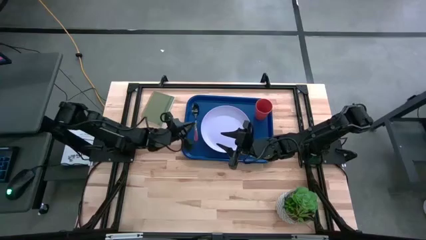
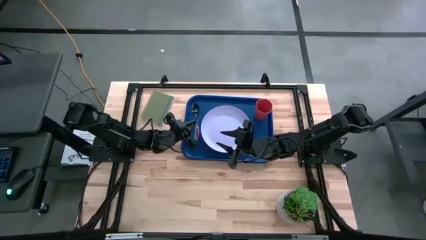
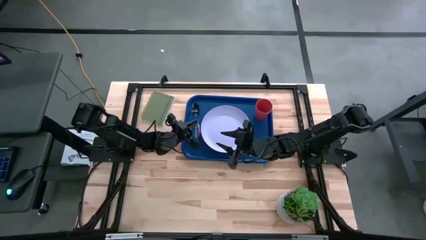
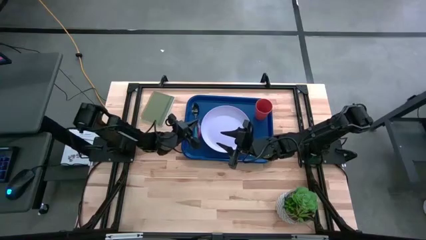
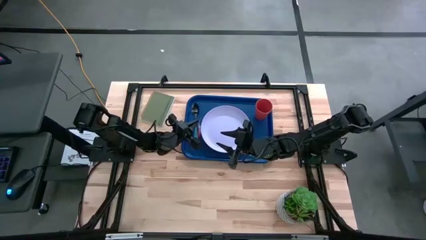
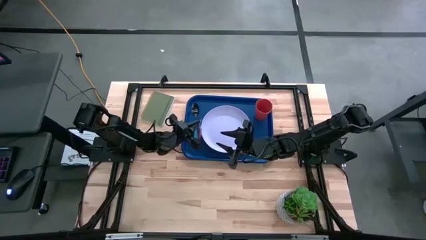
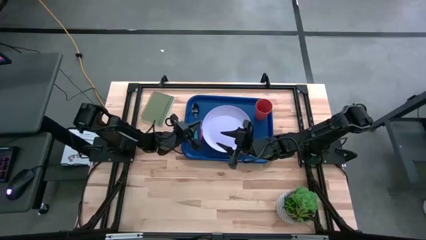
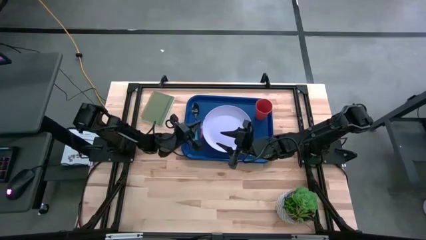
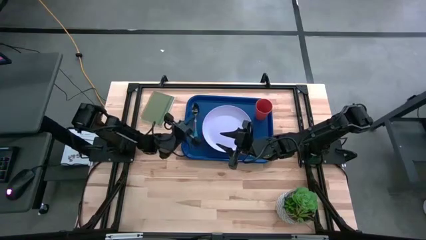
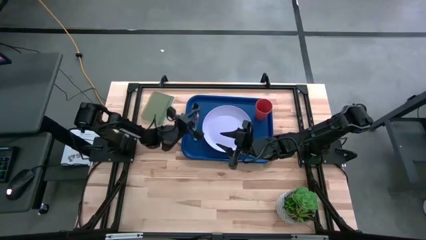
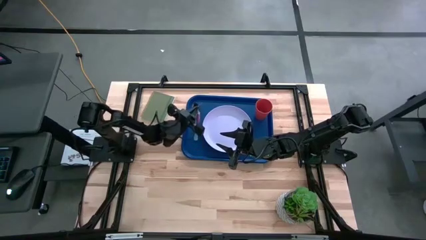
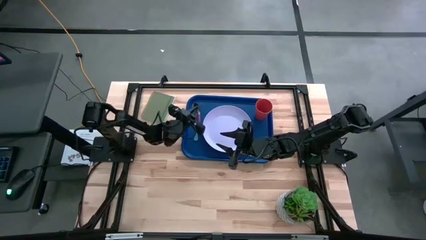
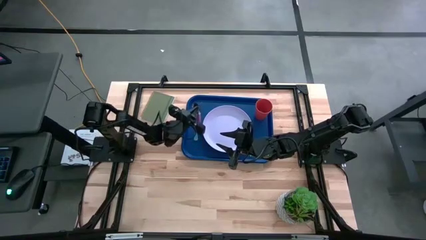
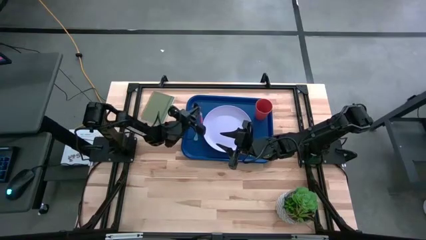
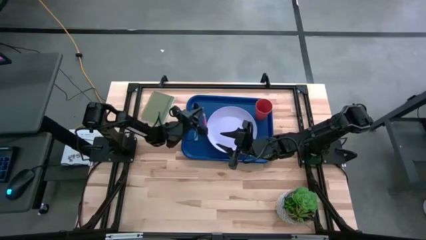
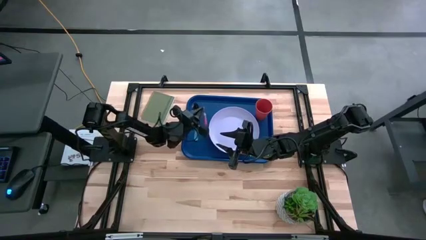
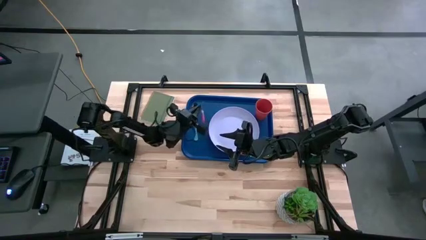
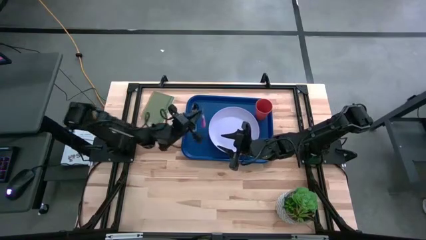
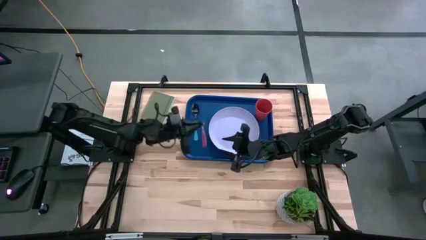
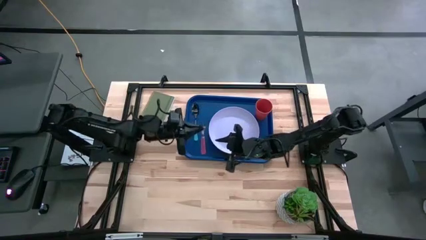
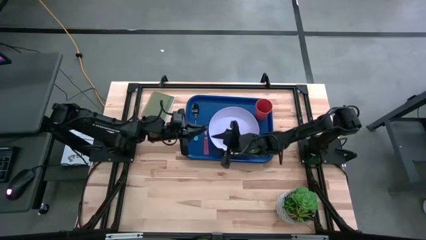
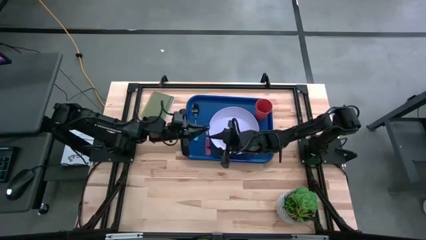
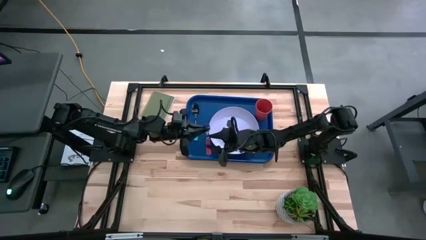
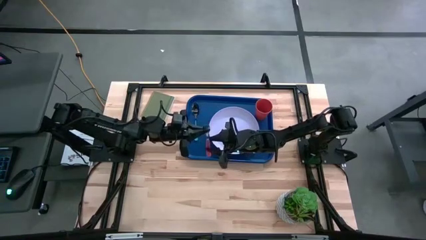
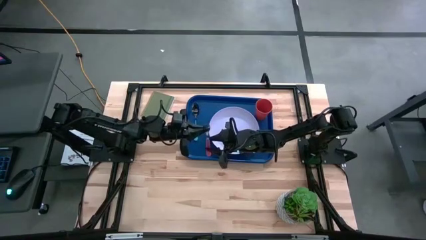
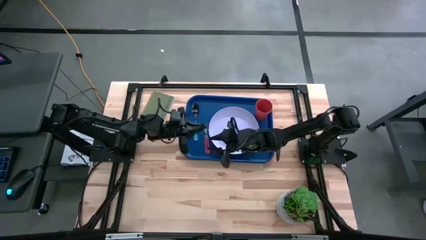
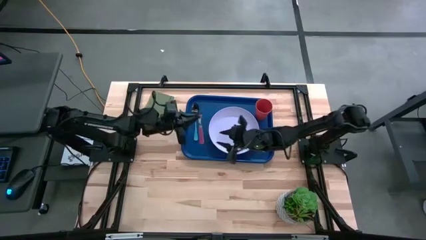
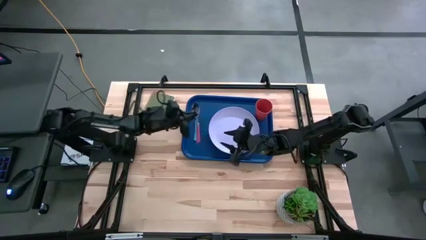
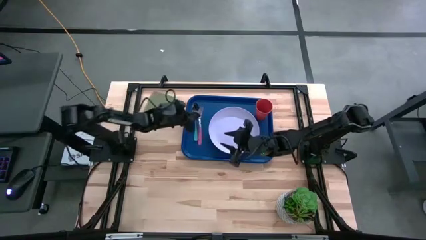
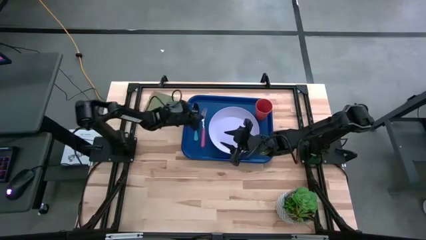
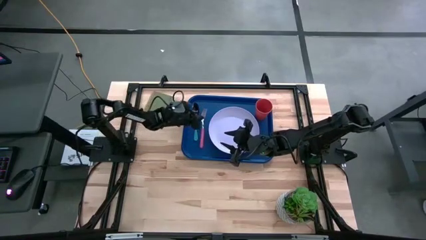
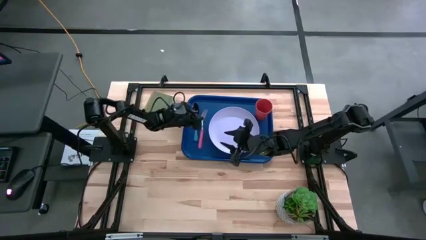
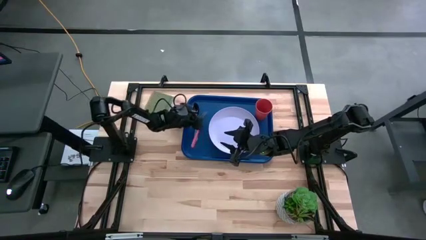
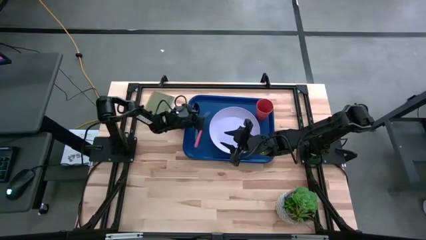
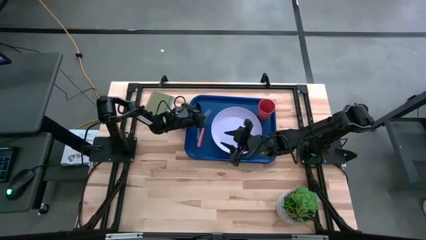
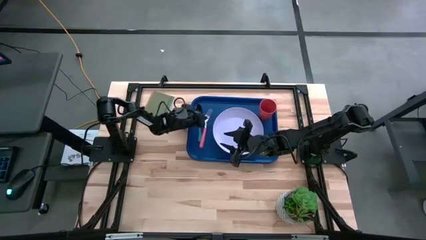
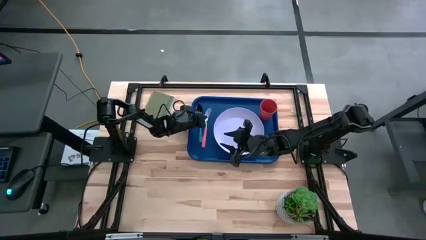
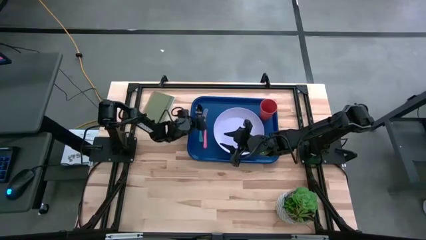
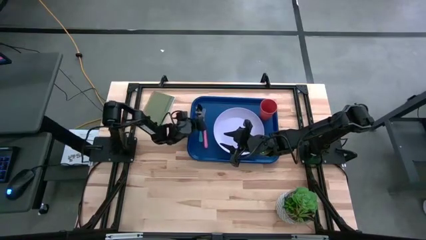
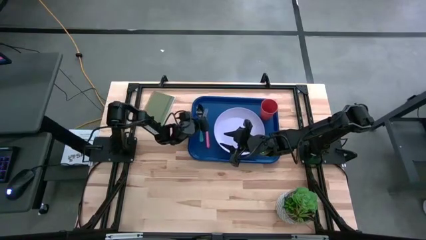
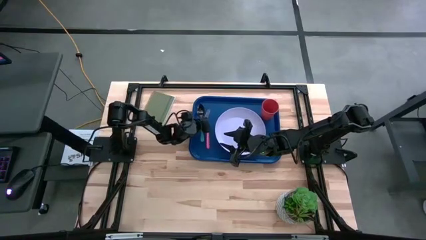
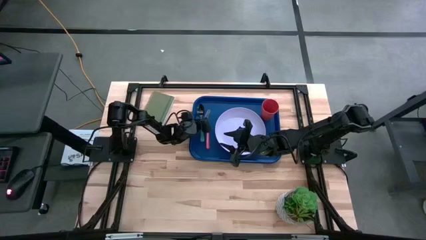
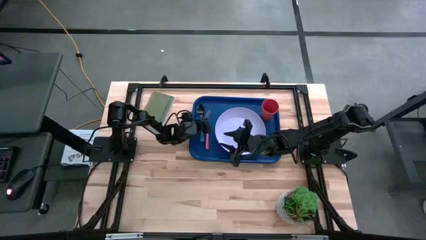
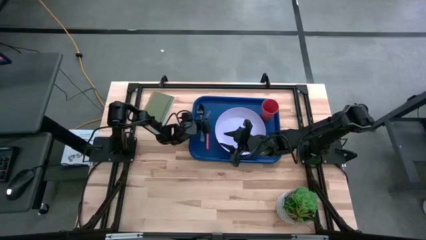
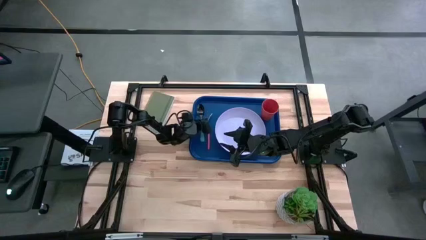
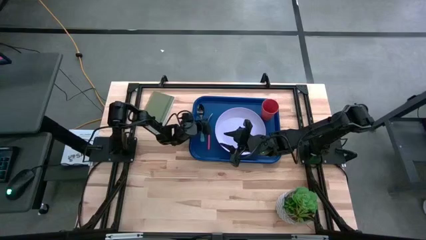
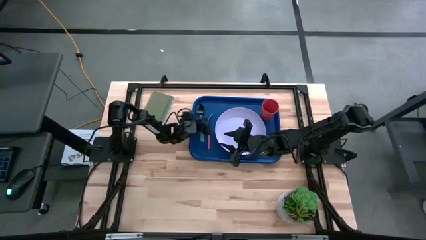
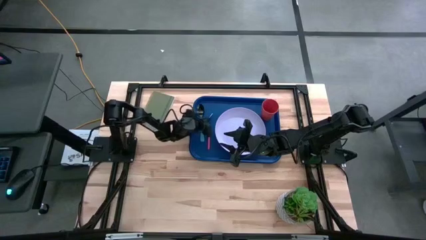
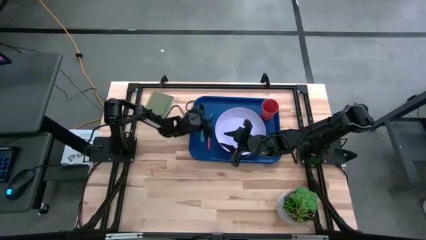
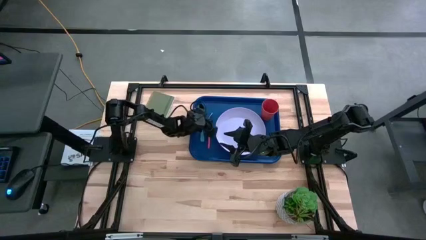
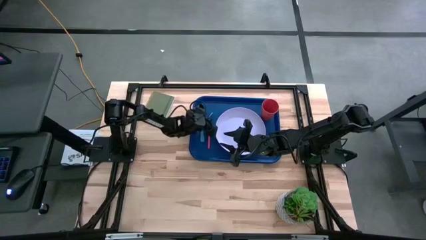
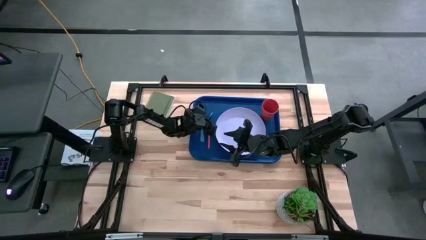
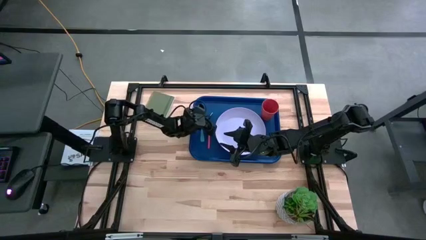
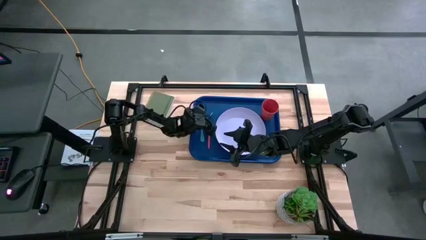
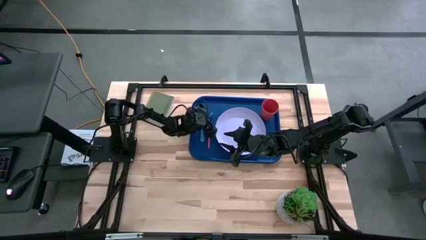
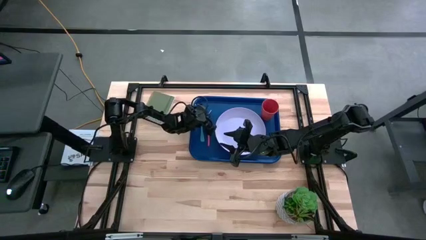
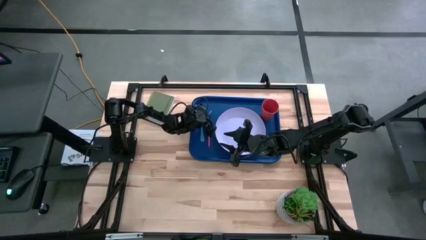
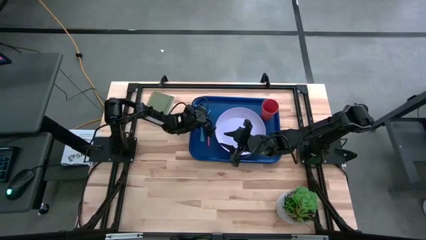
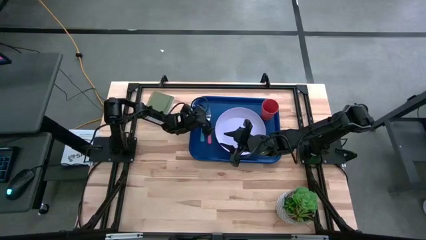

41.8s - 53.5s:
Task: Pick and place plate/cup/fork/spoon on tray
Put the pink fork on the blue serving tray to the left of the white plate

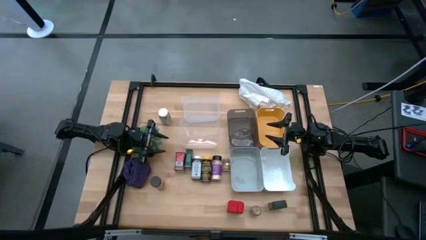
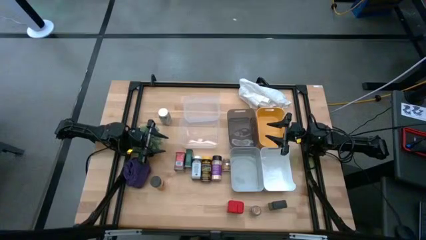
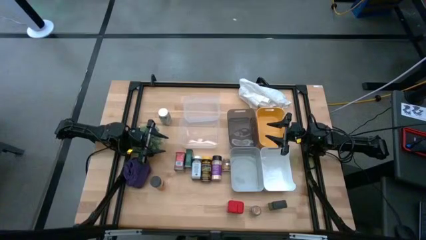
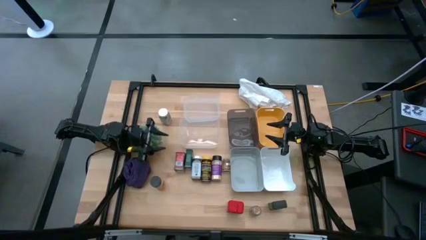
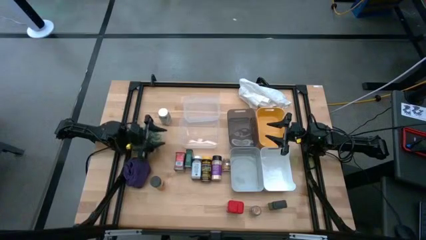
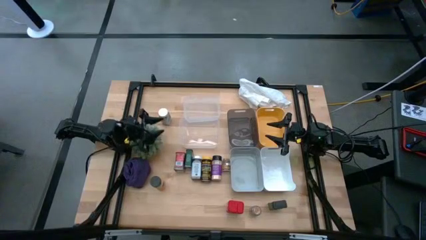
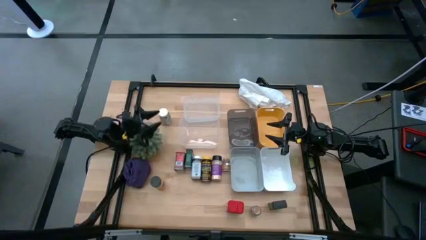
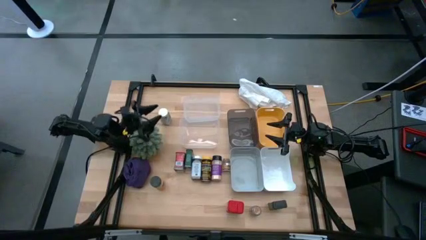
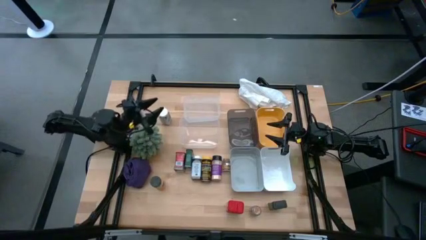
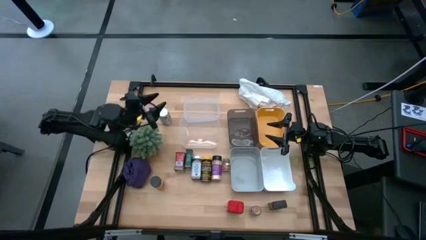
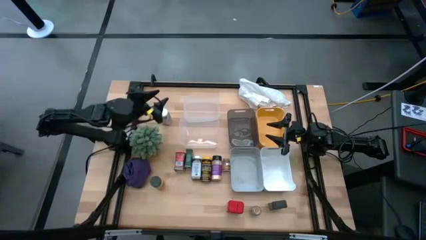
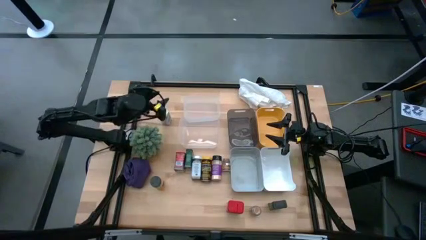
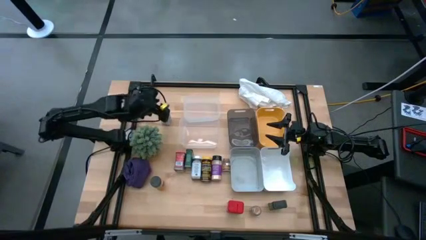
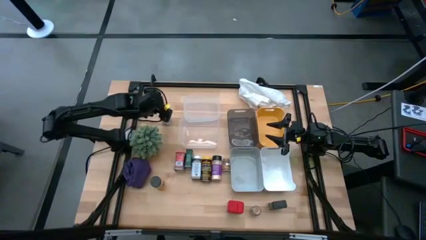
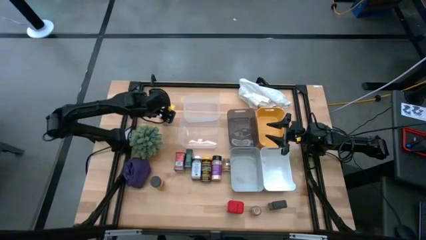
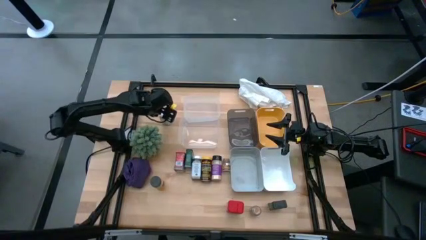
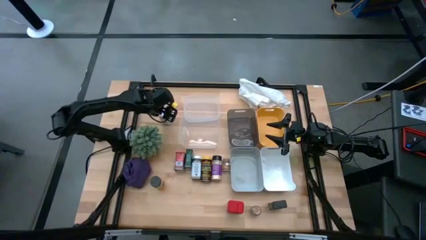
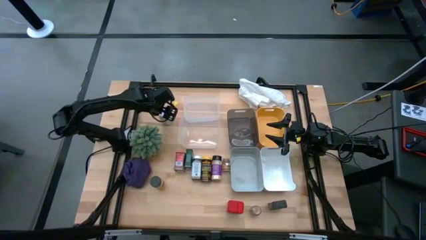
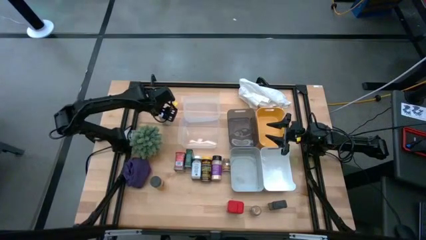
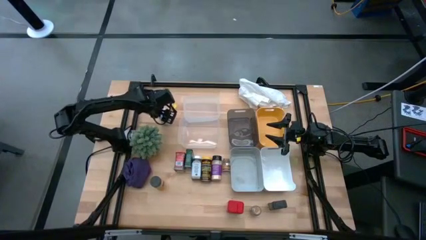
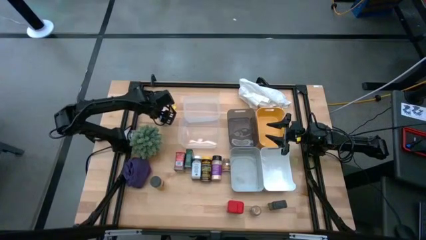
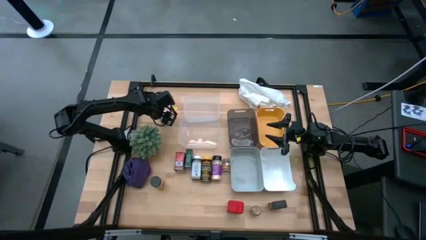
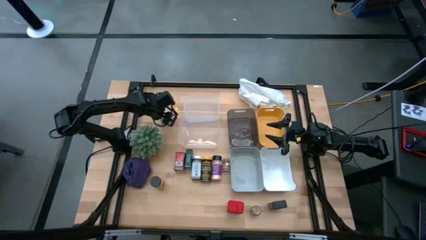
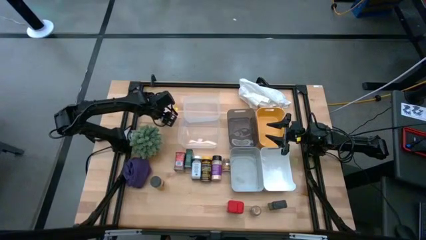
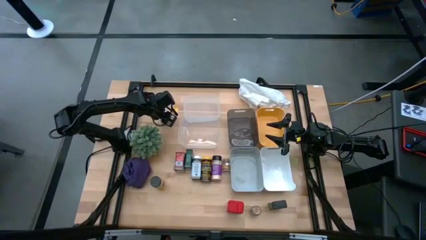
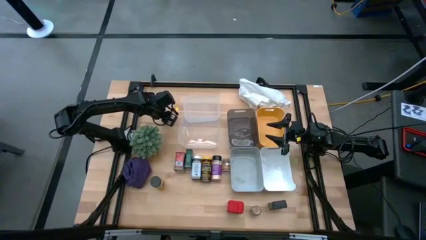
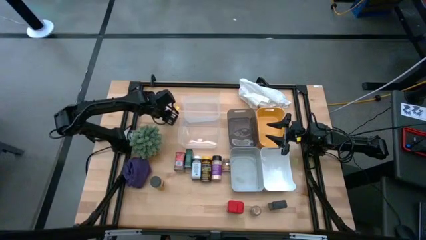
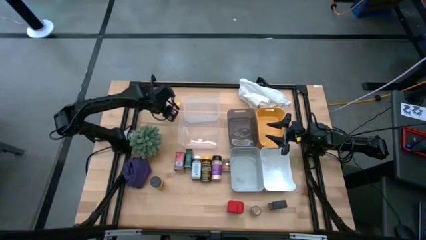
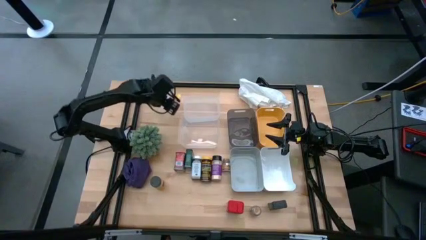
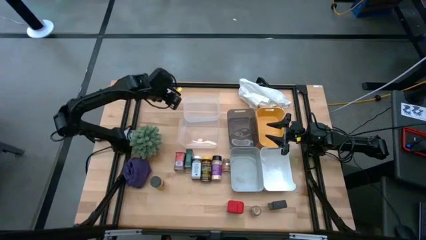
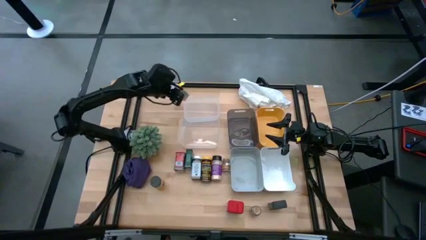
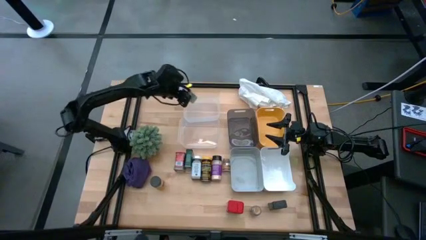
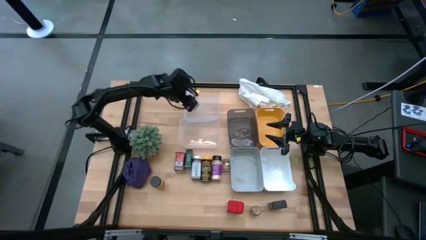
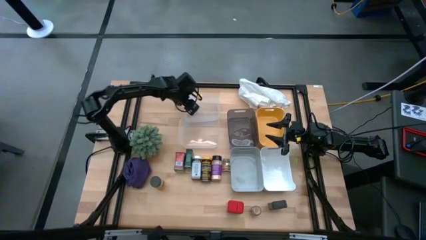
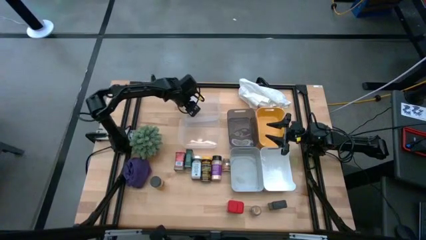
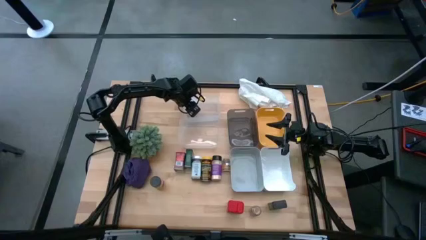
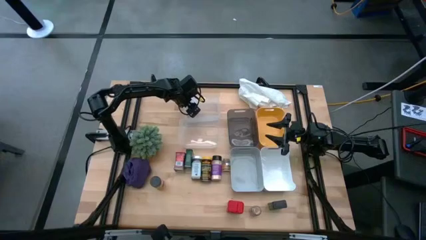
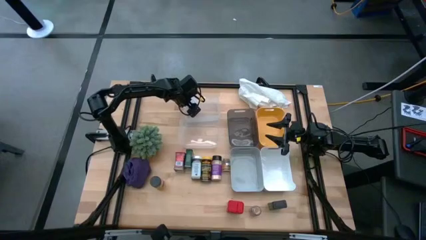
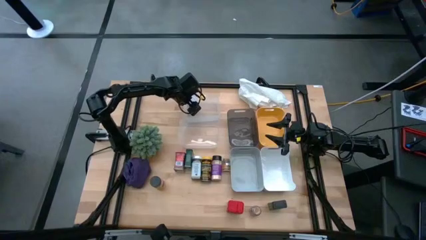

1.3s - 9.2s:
Task: Sort spices by type
Put the top white seasoning bottle into the top transparent bin
